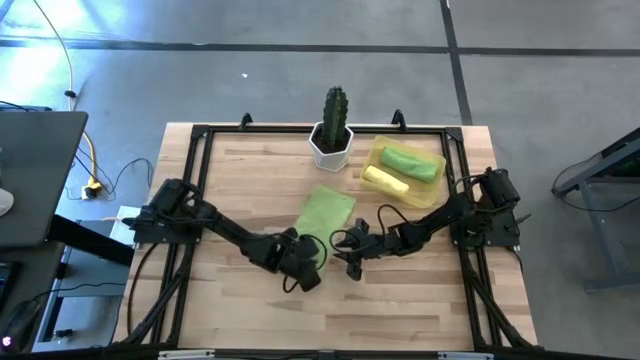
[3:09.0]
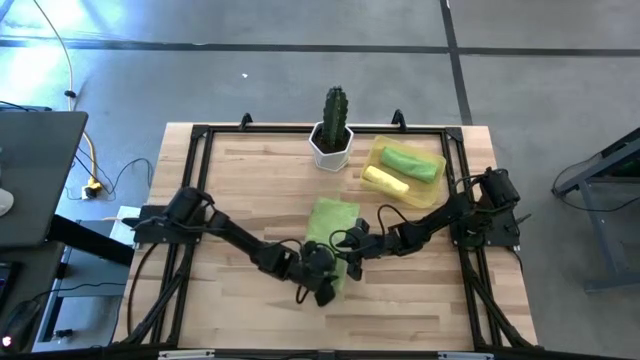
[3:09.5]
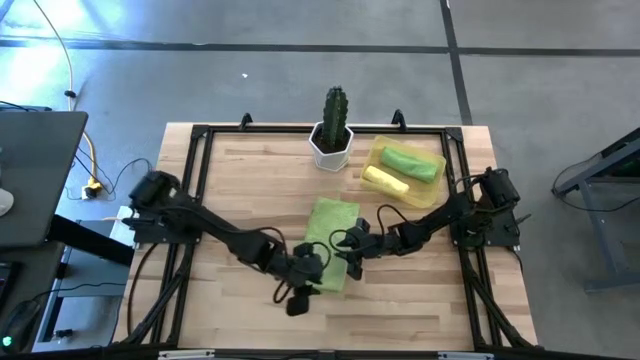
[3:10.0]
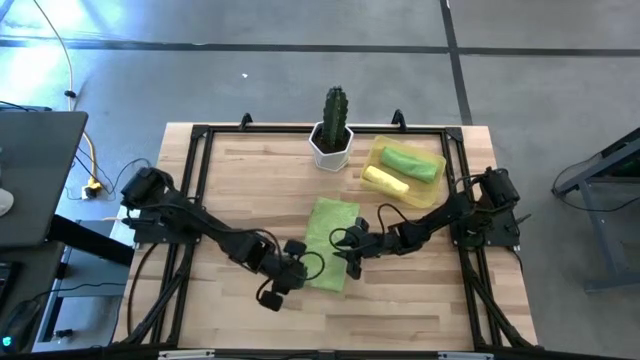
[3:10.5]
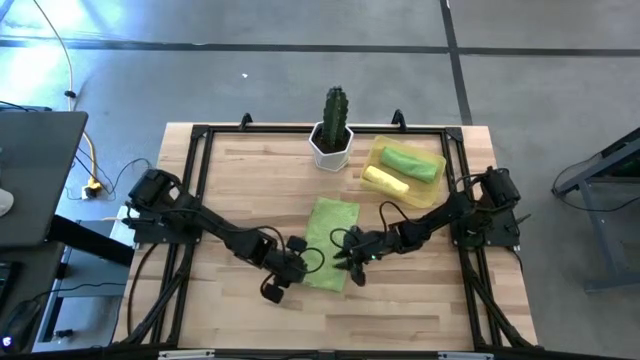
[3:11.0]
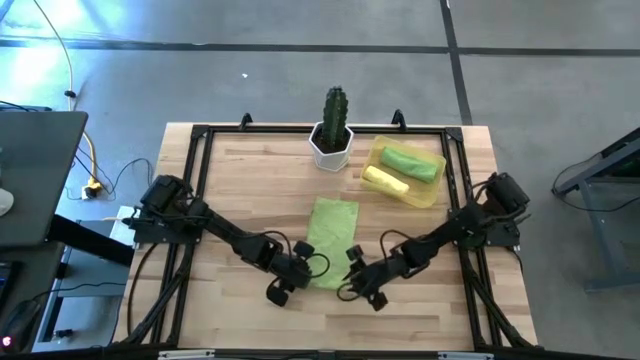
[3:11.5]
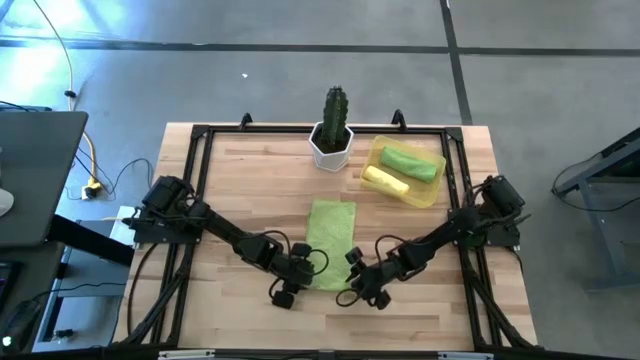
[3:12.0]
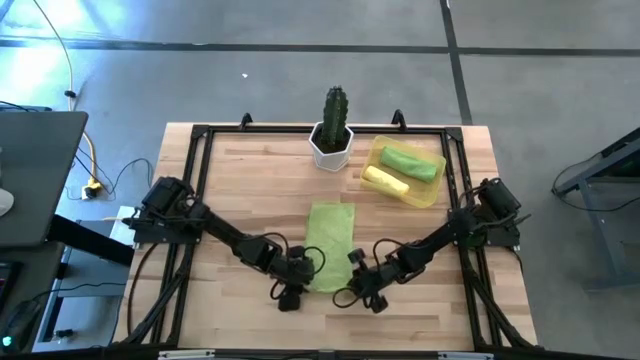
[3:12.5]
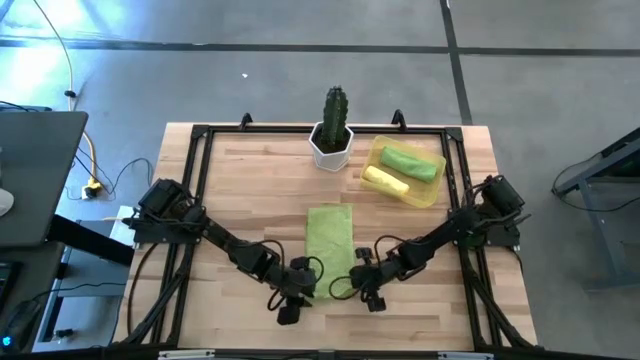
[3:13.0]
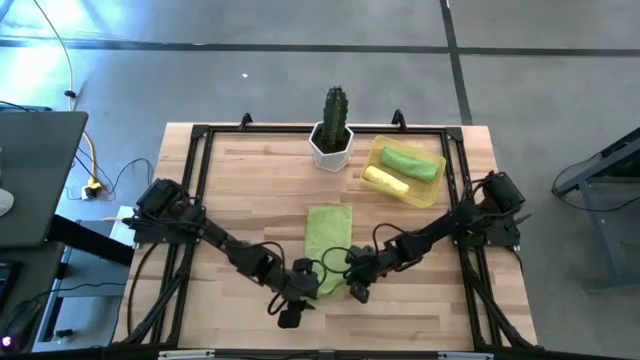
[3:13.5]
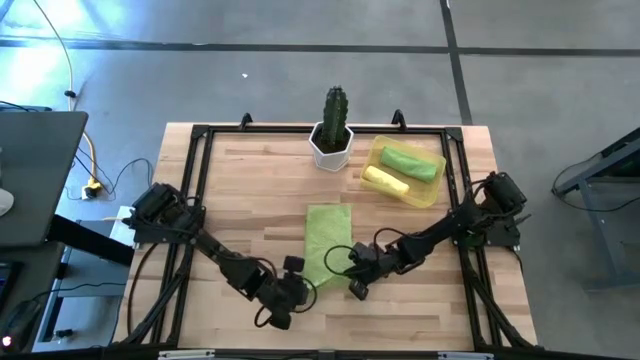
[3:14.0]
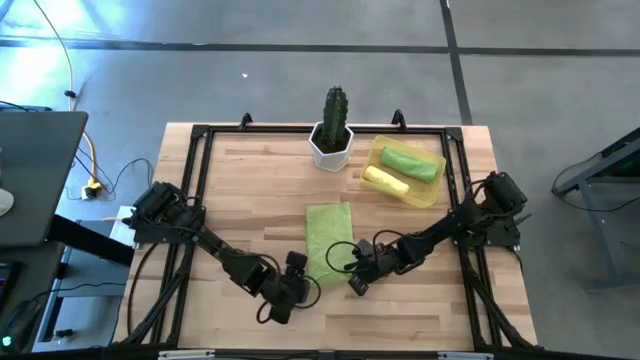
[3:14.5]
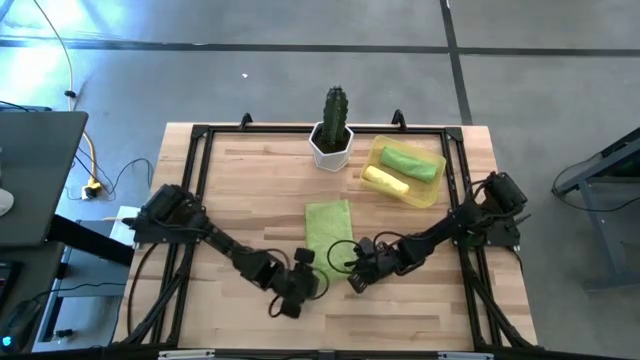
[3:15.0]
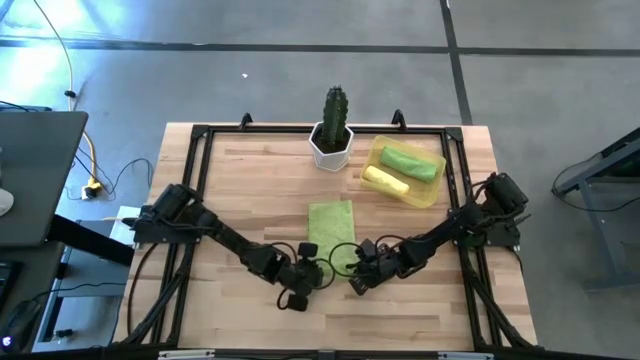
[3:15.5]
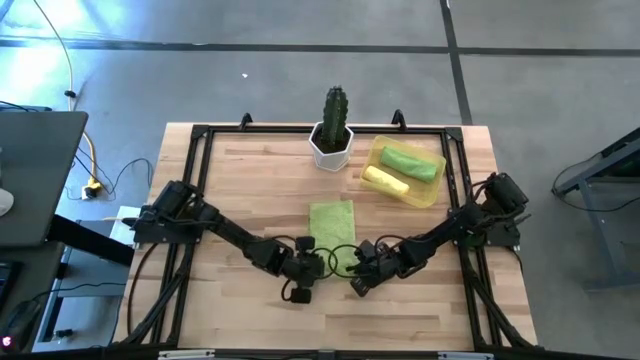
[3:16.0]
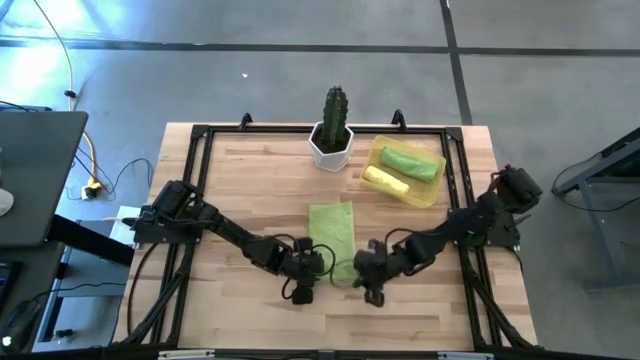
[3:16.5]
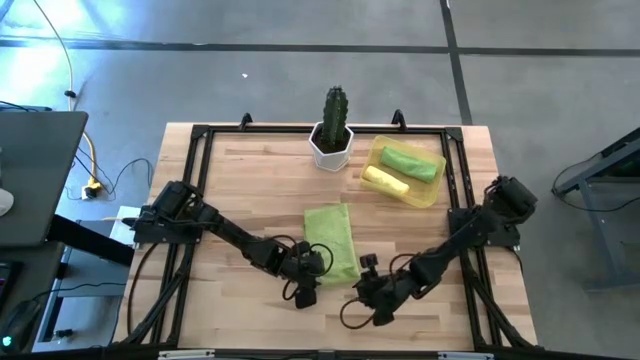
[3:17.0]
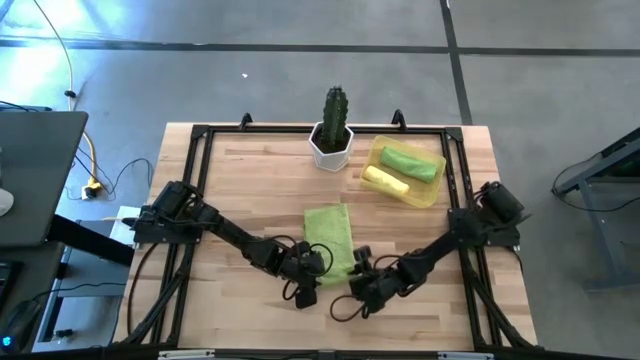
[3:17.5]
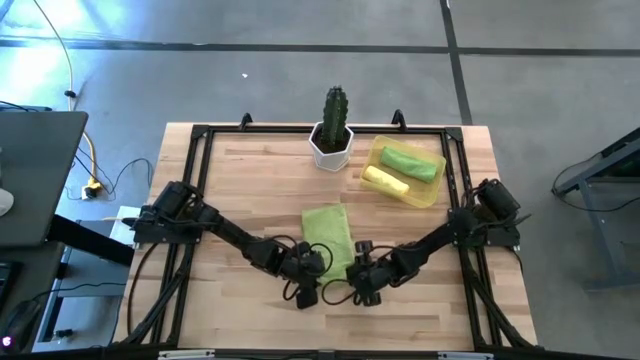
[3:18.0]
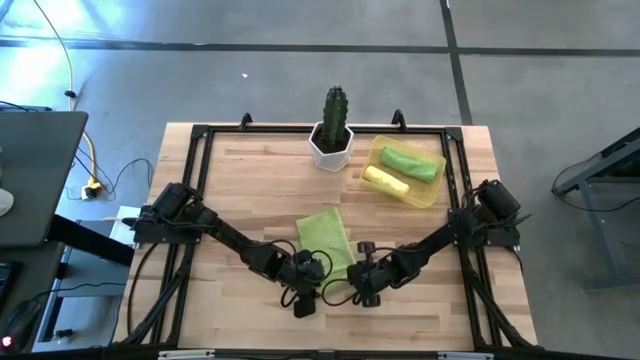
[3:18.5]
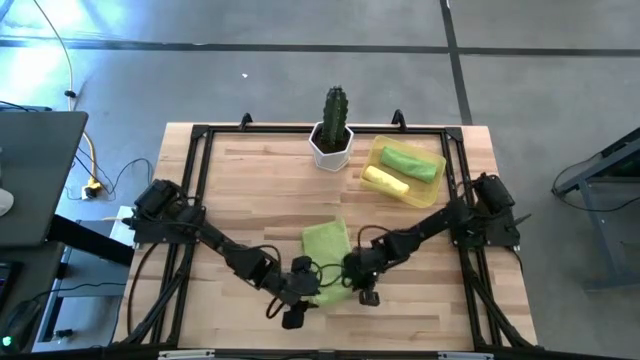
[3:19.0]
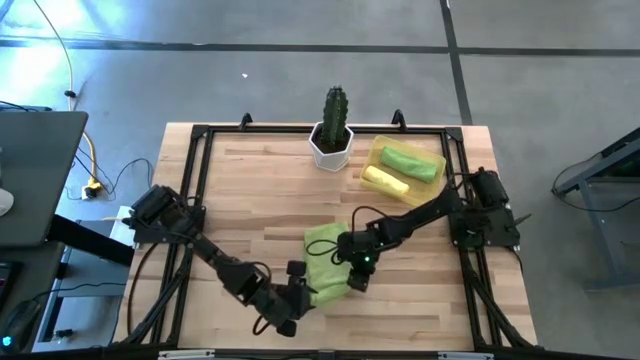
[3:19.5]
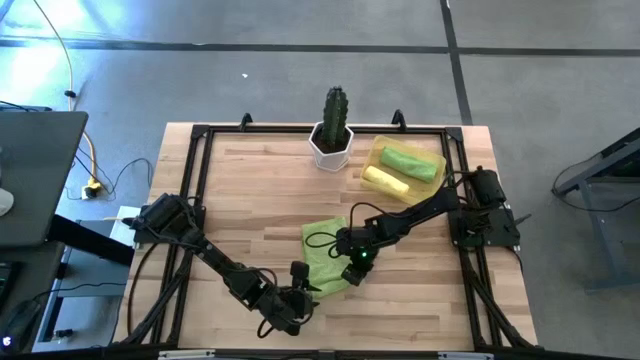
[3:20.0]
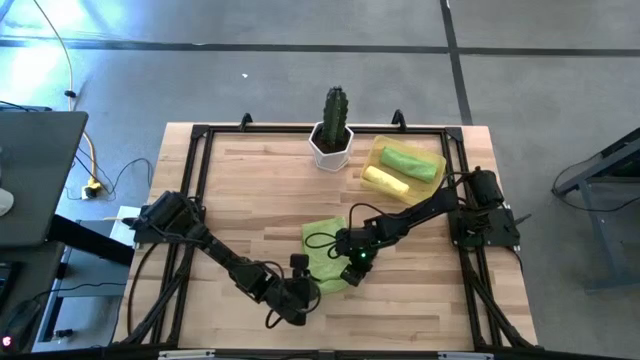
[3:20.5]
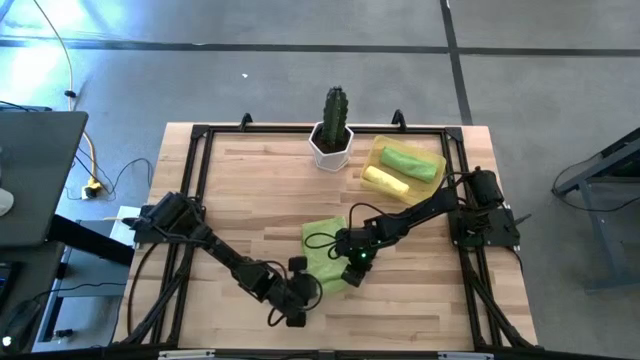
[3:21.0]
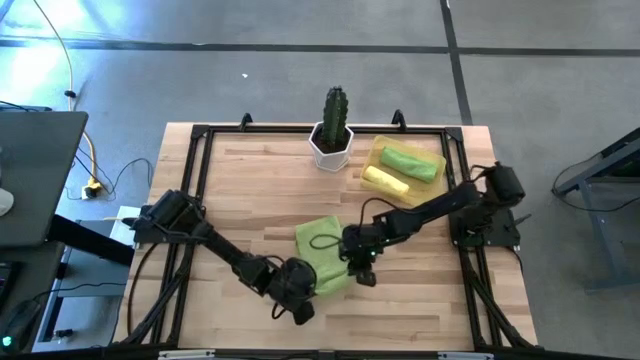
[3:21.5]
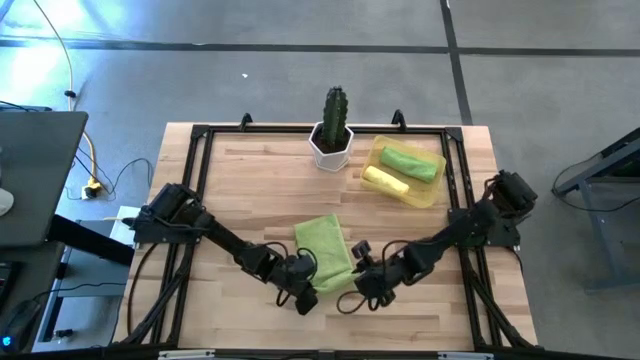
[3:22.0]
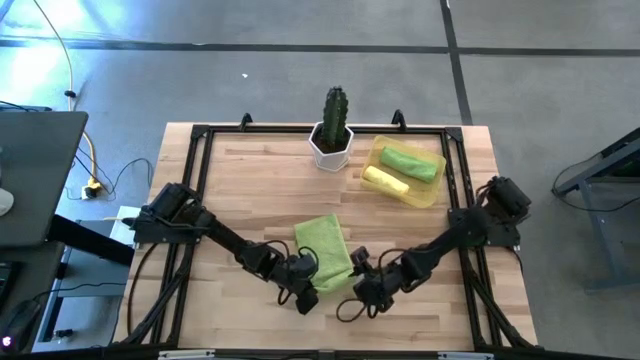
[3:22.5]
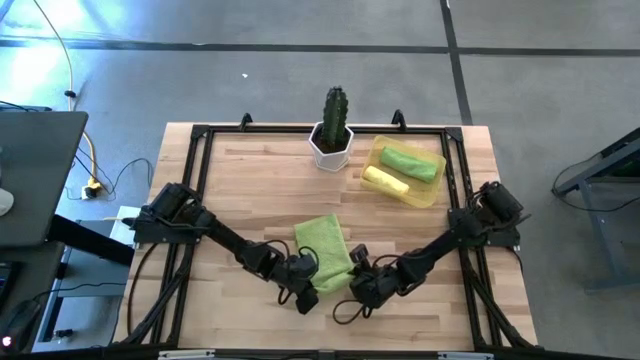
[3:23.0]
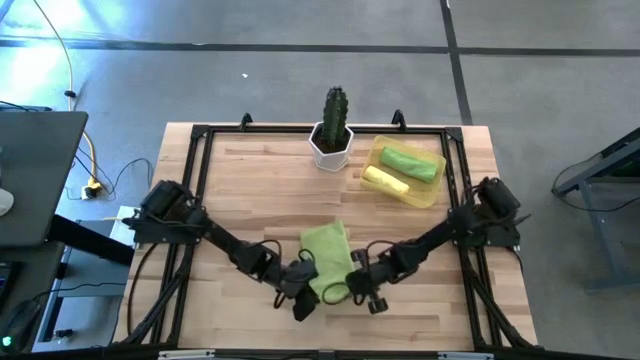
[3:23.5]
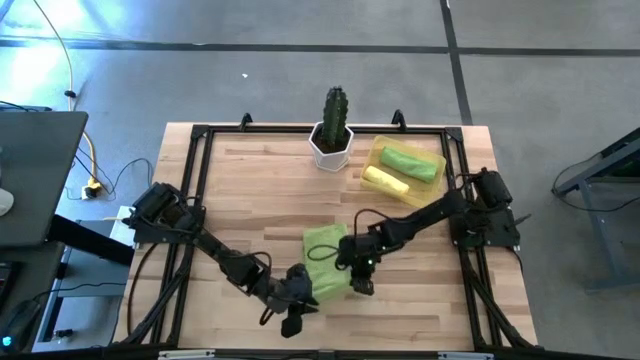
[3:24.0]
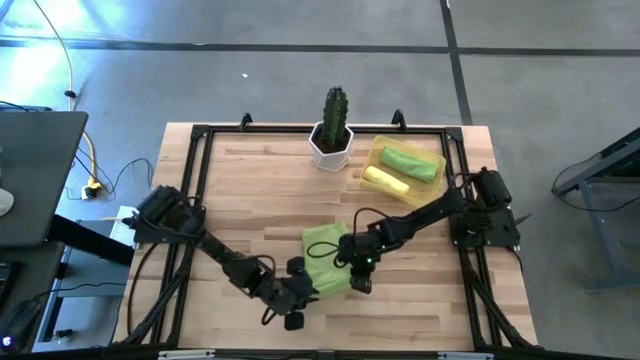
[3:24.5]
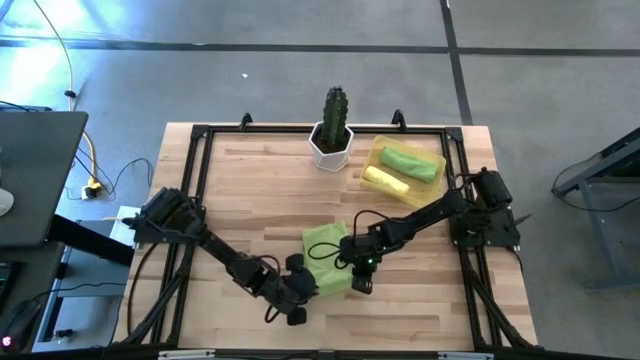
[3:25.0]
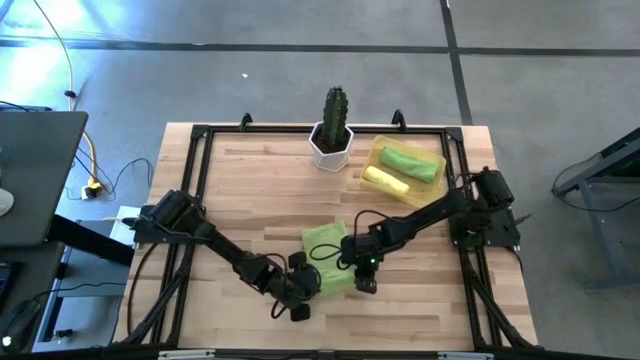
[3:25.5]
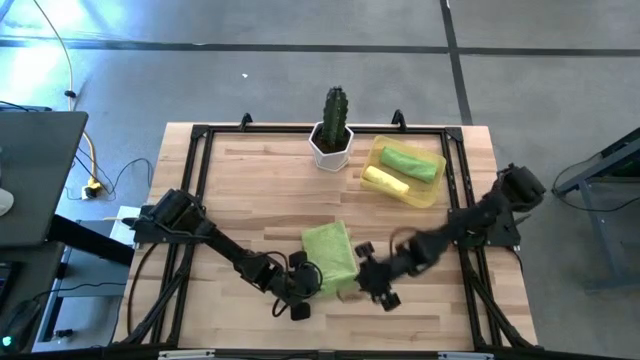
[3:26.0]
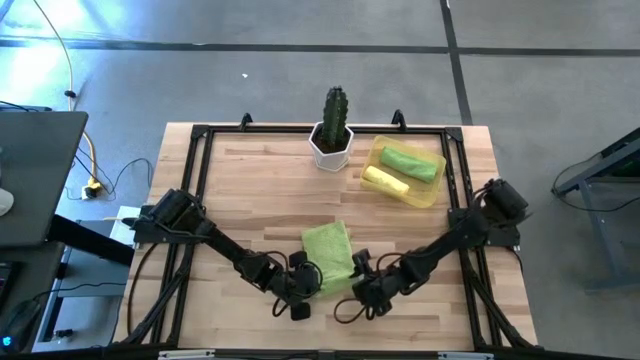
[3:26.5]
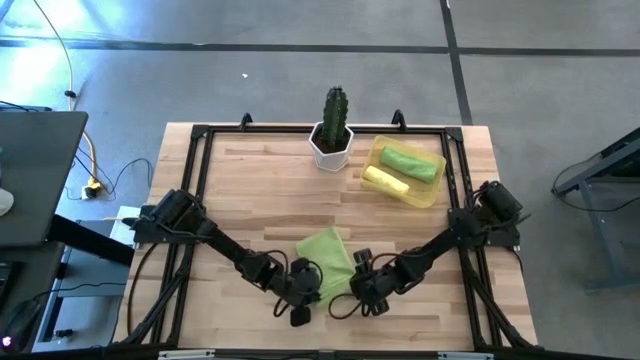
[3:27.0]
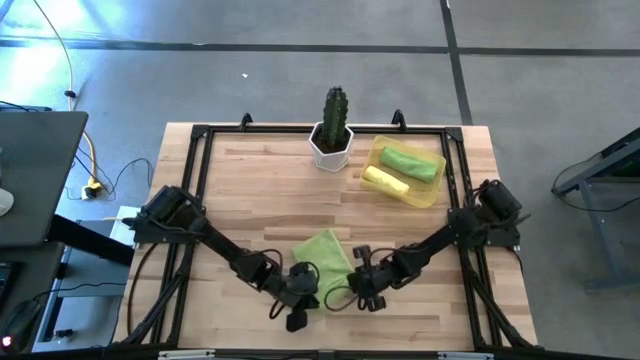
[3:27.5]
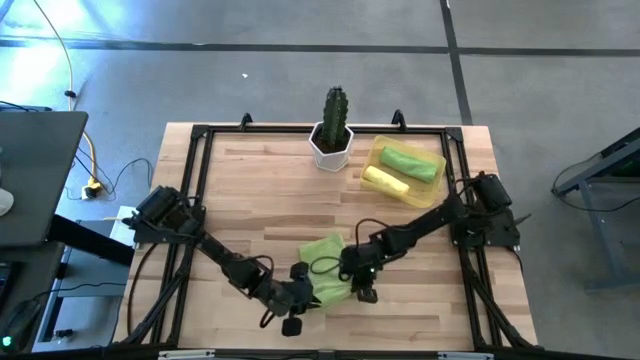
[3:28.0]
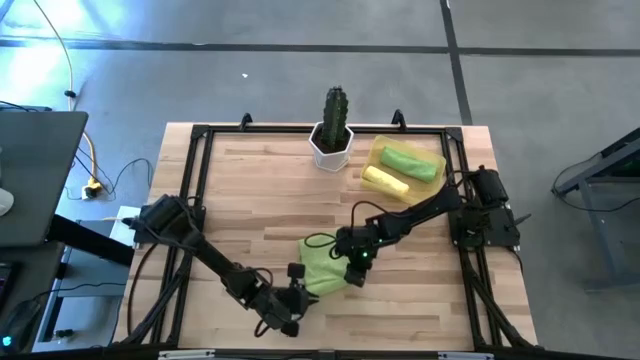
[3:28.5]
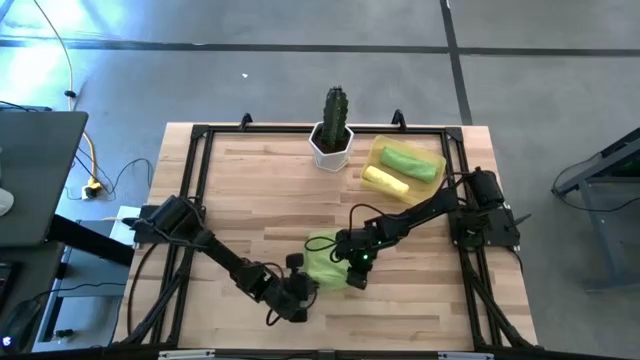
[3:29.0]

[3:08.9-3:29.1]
Task: Roll microfiber towels into tight, uniform cylinder then place into a basket
Roll the light green towel

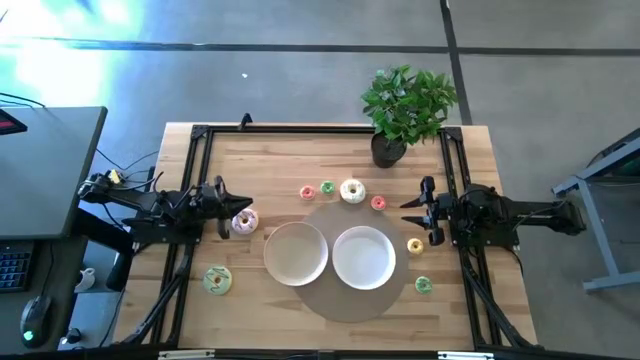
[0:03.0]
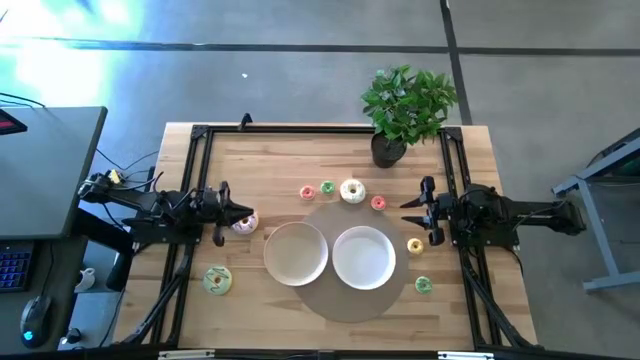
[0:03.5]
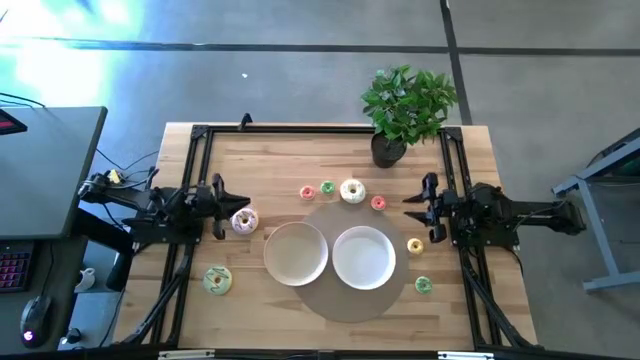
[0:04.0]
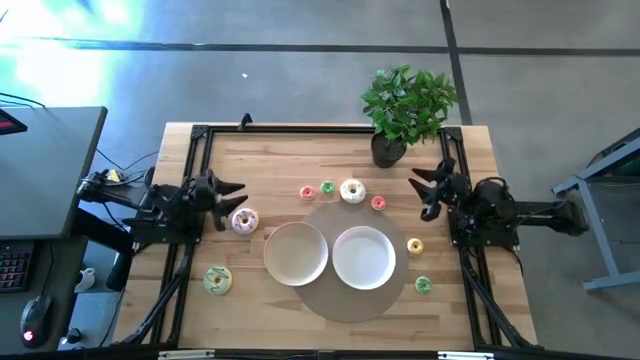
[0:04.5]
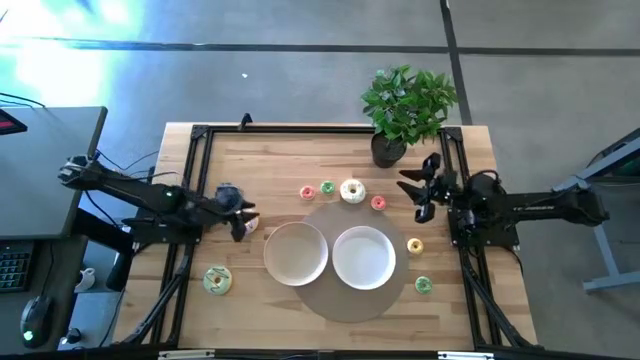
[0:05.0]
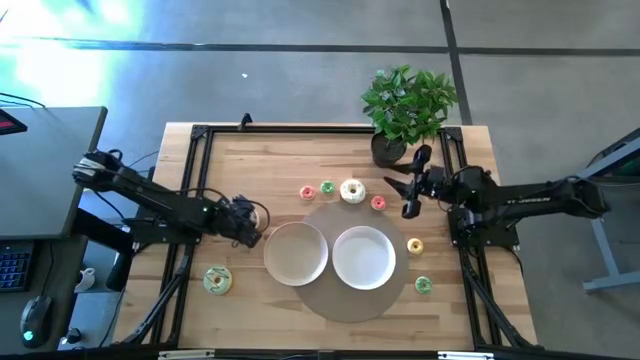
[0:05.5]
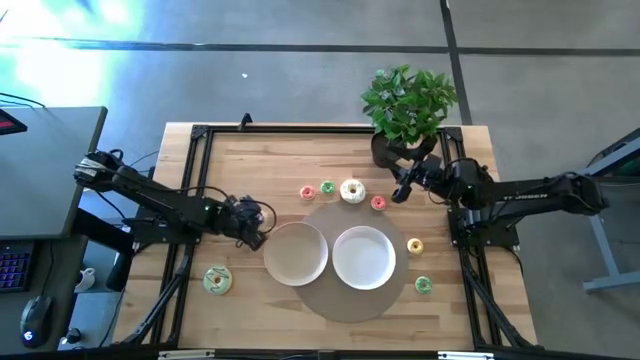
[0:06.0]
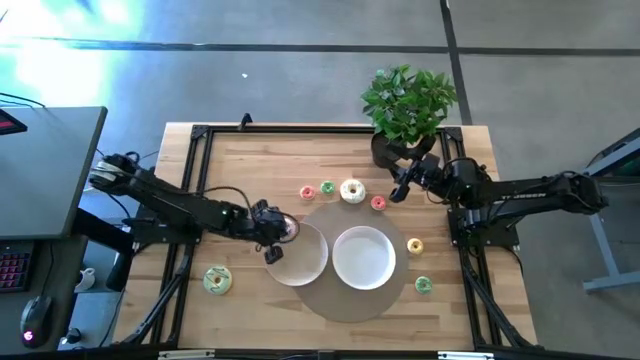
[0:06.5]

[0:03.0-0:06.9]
Task: Pick & Place donuts
Put the large purple donut on the brown plate
